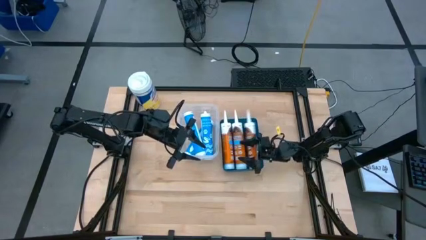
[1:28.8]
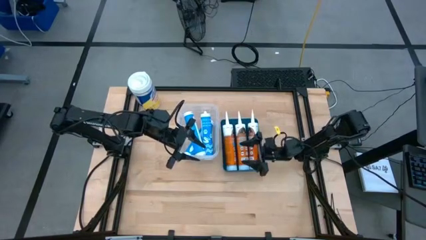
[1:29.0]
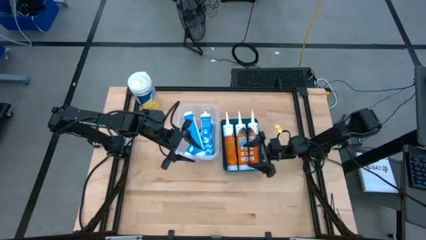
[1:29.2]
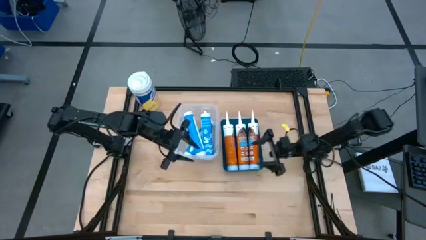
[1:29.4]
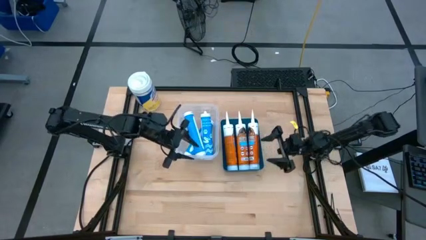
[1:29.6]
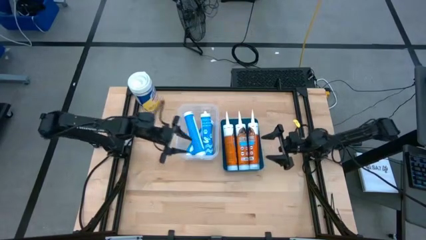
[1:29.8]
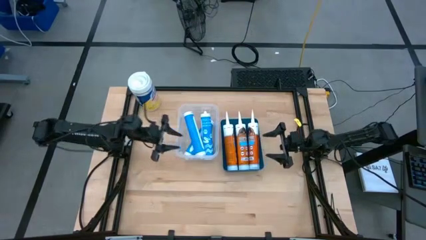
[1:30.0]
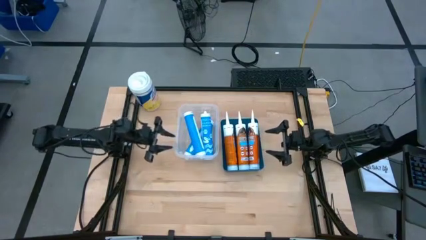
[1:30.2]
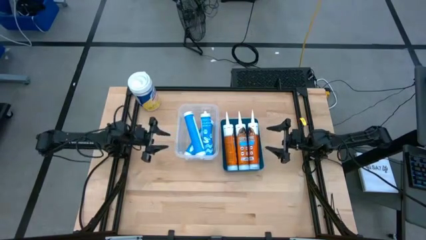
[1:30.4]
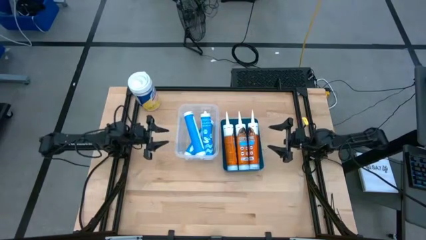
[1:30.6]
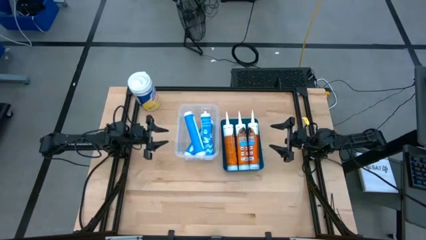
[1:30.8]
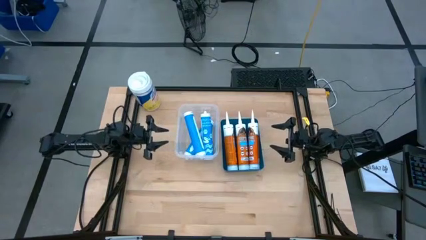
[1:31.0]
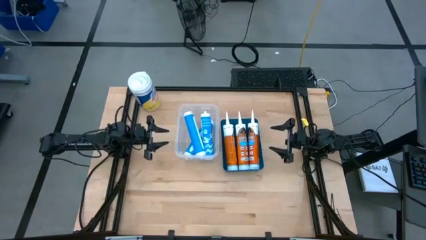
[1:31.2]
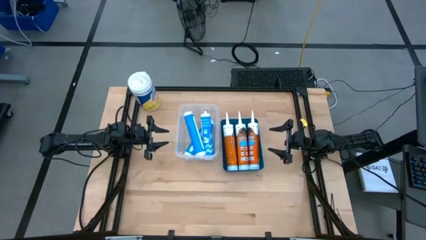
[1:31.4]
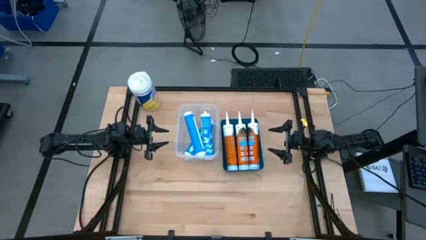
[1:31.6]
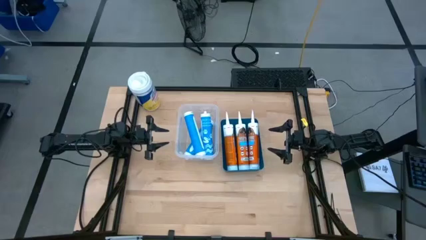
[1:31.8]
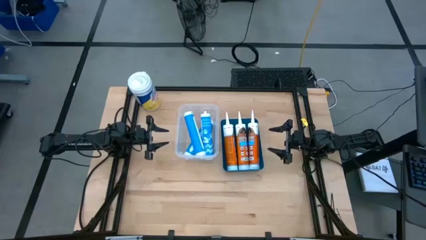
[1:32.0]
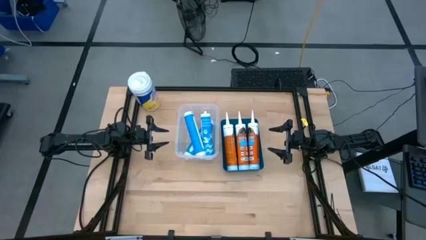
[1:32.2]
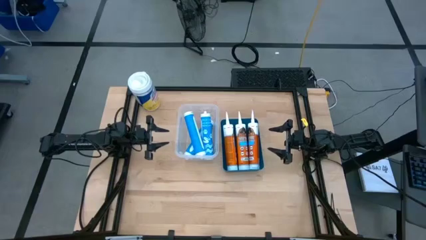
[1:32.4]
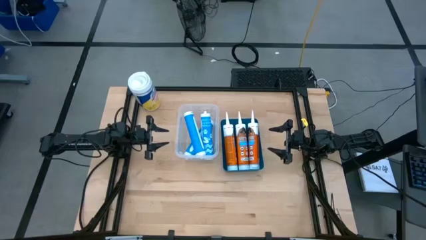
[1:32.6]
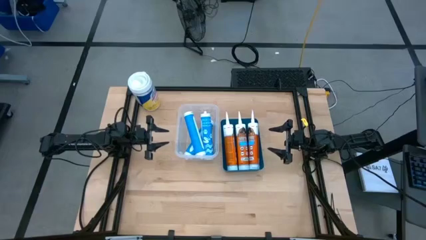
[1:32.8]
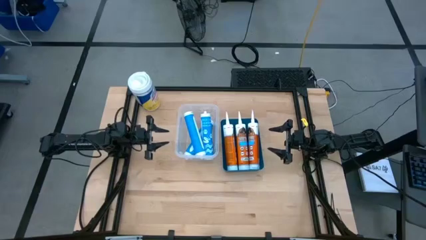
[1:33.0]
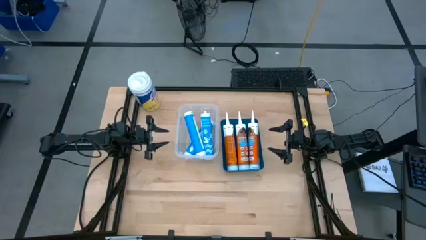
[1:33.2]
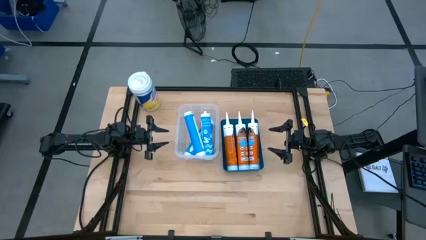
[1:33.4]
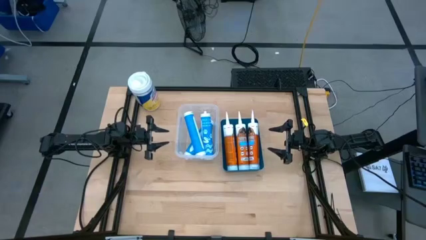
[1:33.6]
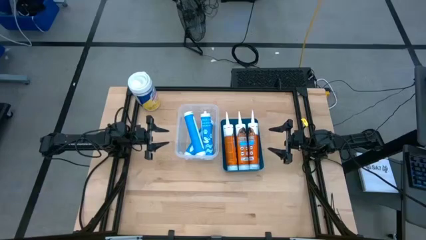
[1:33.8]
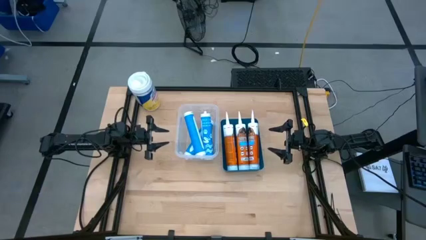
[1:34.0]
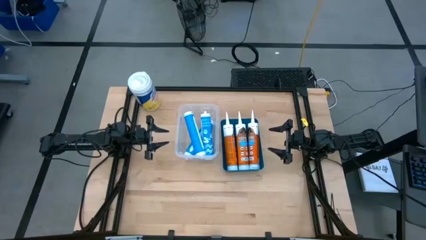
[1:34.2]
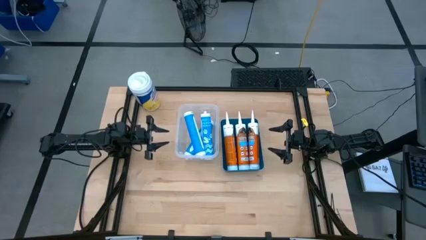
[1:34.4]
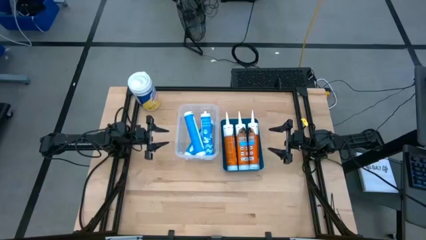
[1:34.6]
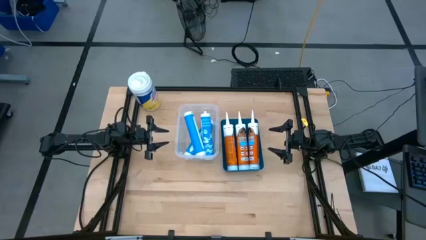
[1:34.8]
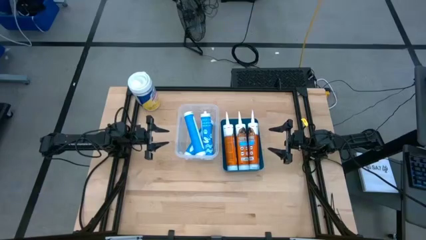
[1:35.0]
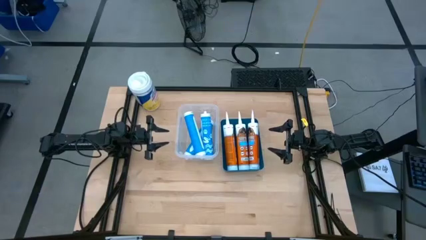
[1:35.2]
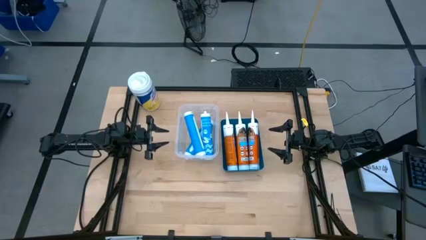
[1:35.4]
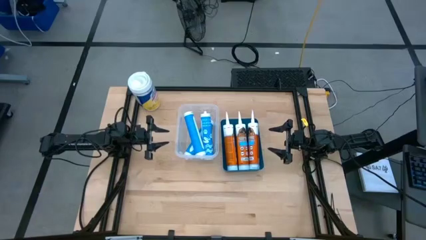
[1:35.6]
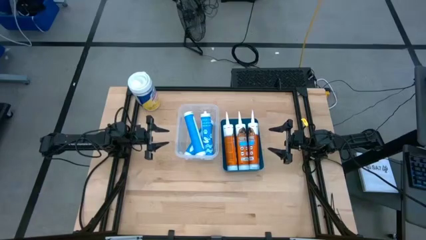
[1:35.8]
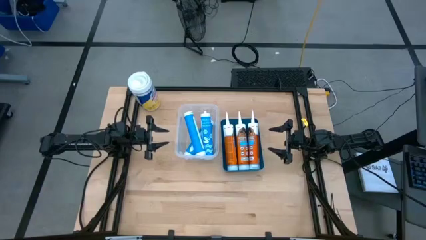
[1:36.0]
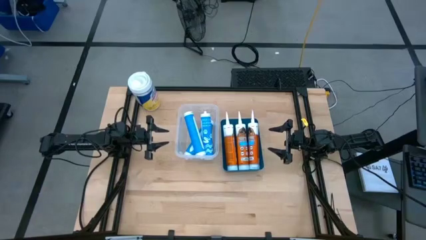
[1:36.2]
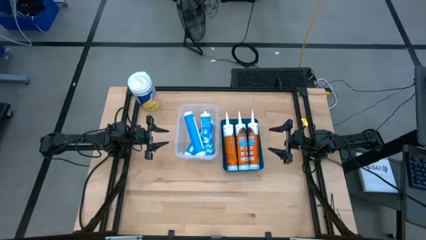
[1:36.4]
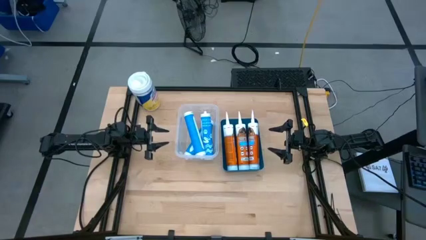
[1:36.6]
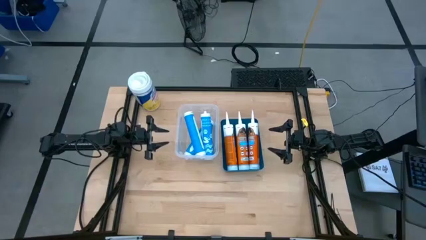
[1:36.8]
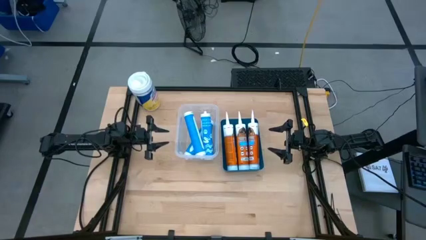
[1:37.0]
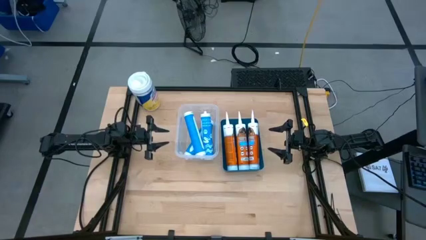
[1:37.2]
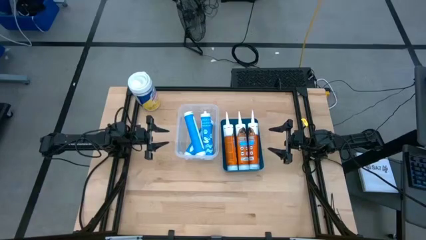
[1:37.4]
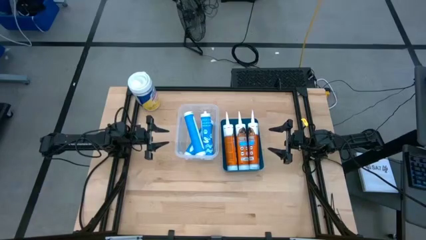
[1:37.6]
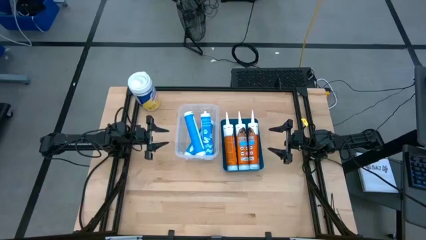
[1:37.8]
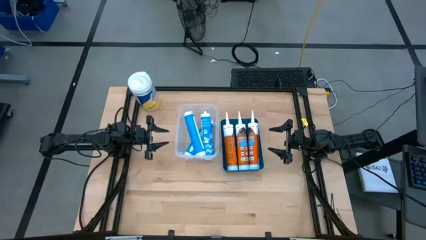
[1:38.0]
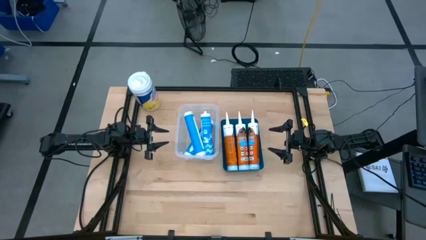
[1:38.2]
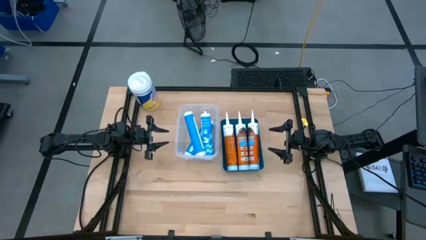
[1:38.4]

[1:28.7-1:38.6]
Task: Pick & place silicon tubes, Sealant and Lysol wipes
Return to Home Position

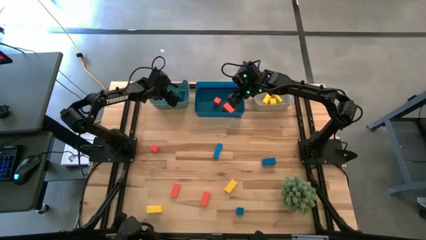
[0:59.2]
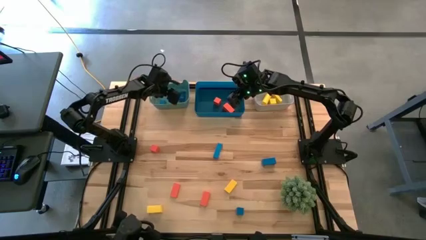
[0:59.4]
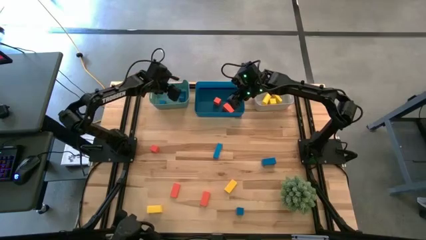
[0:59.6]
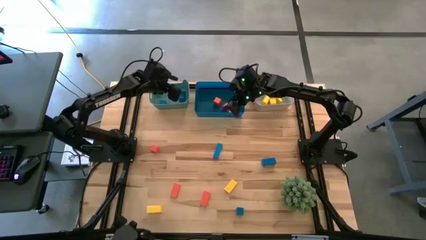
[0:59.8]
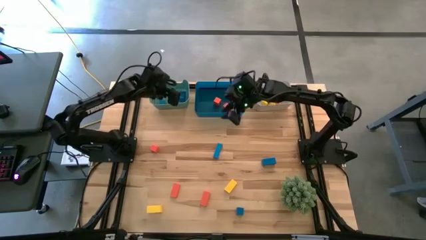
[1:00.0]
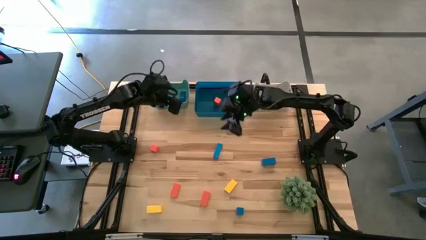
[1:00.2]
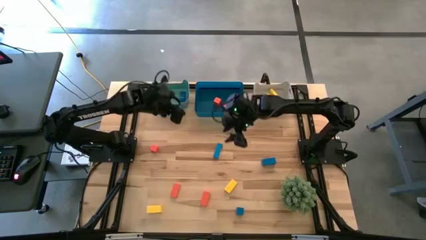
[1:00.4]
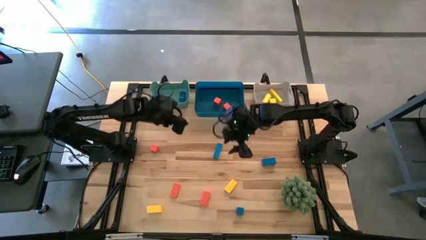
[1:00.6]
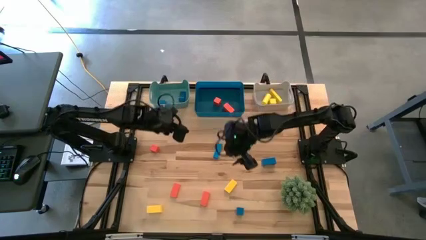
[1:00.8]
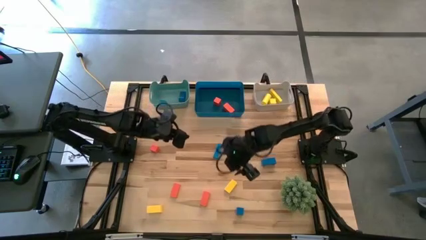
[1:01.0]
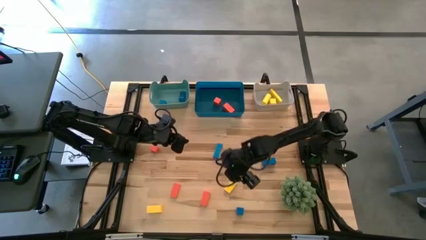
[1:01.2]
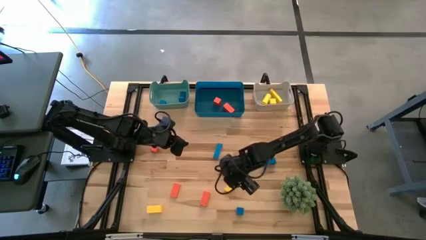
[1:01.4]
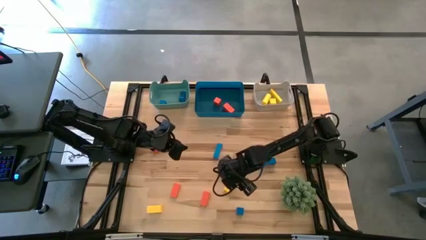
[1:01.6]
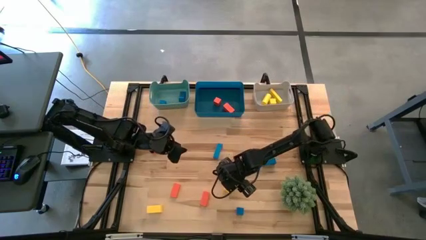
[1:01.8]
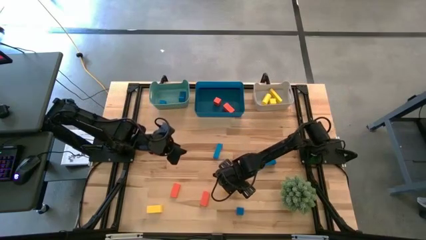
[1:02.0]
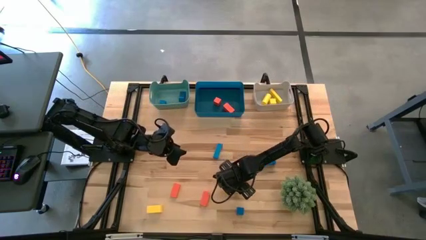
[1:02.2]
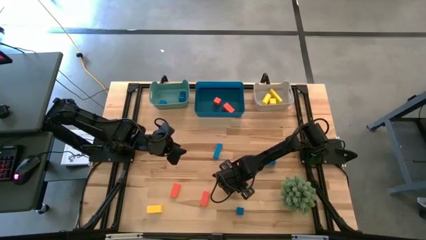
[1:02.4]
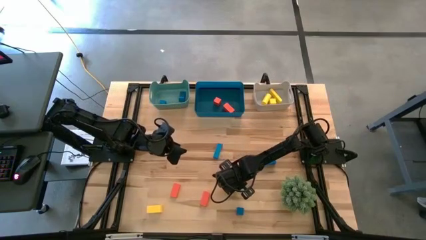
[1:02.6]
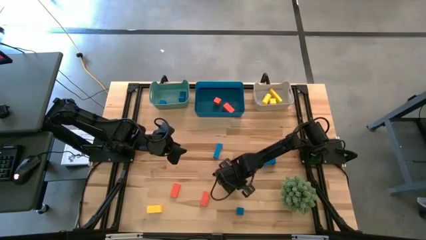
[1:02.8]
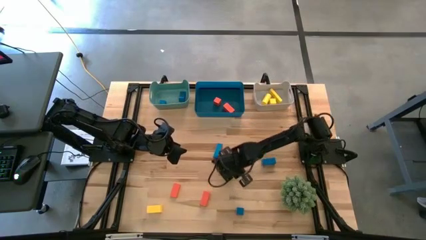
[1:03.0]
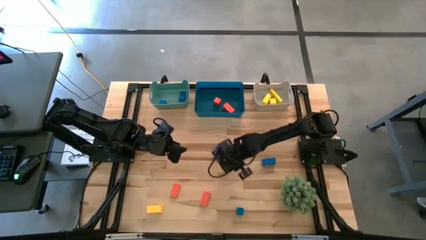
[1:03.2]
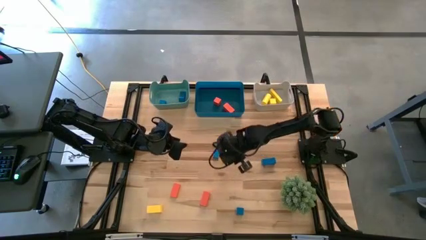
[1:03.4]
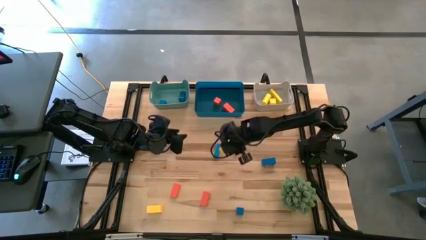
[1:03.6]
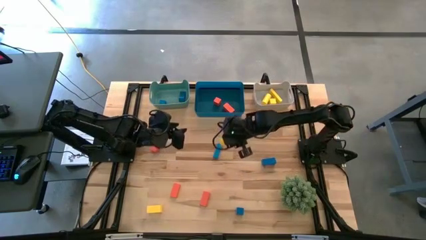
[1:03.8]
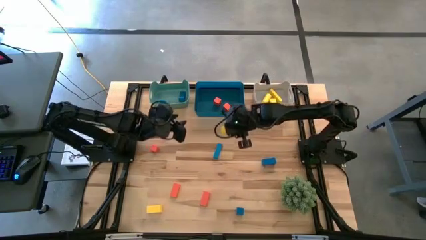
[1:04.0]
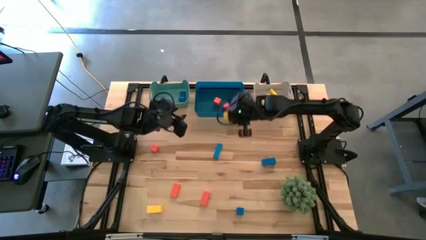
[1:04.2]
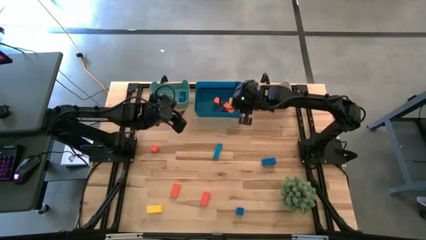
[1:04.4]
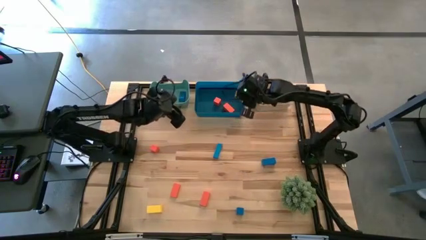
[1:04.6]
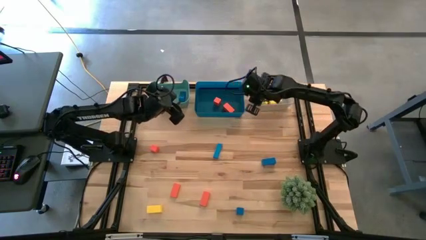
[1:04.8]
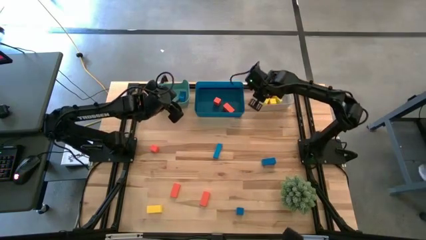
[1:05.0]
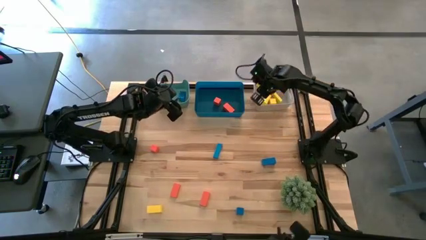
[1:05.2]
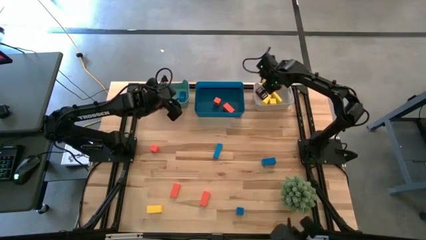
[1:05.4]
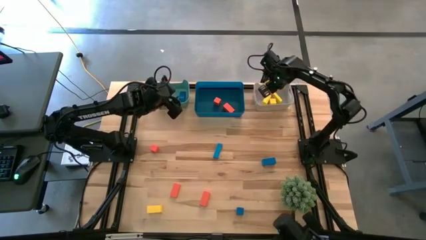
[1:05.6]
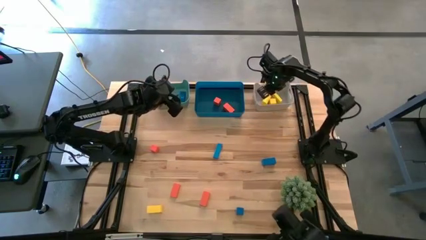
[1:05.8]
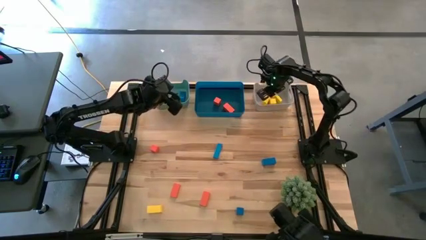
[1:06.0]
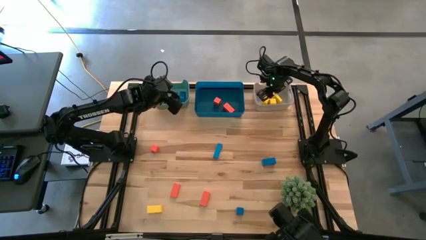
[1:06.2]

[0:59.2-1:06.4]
Task: Sort & place blocks by color
Put the yellow block into the white bin
